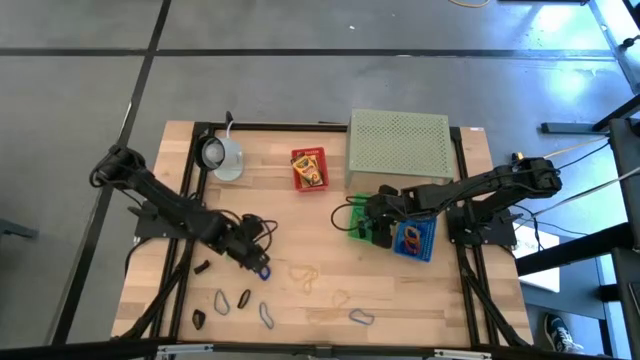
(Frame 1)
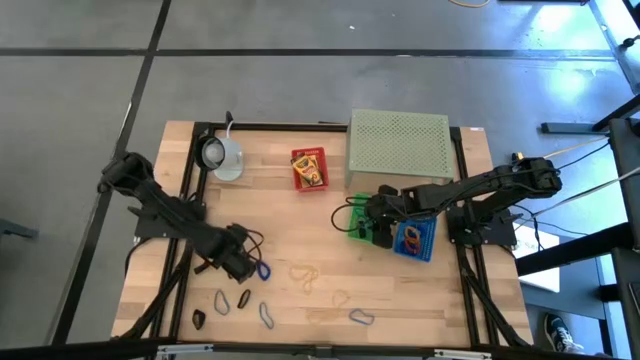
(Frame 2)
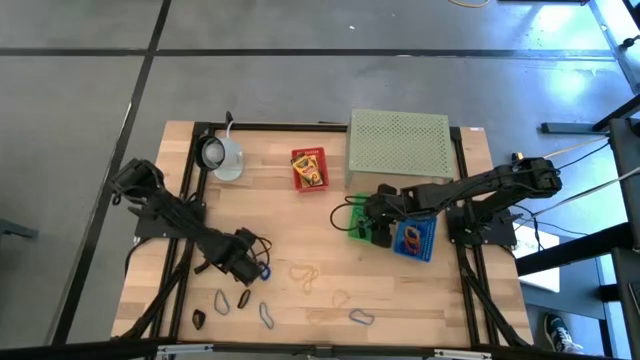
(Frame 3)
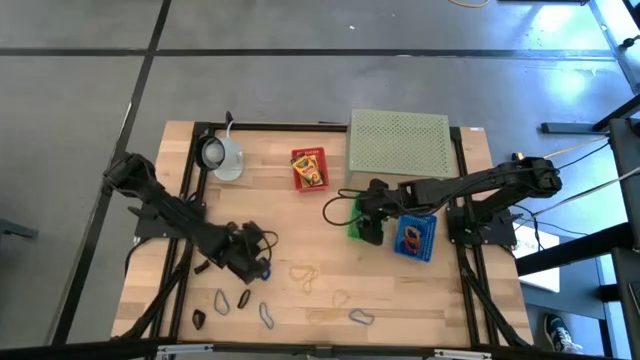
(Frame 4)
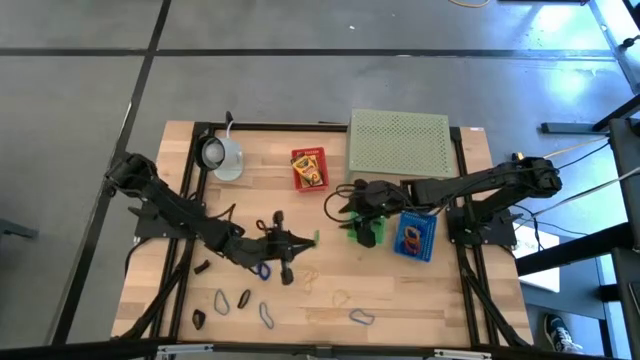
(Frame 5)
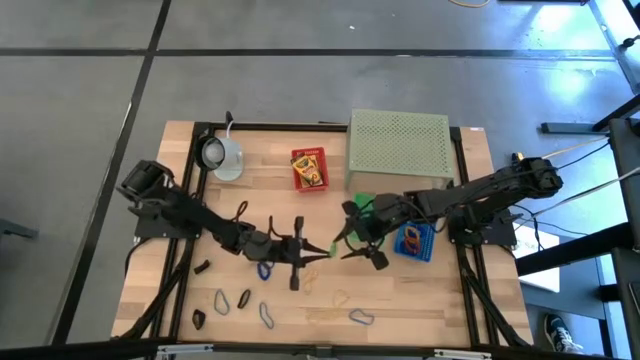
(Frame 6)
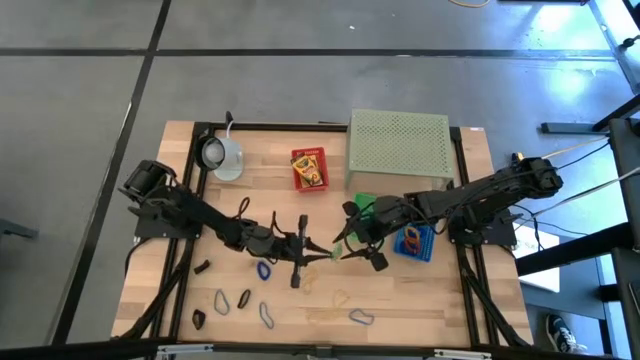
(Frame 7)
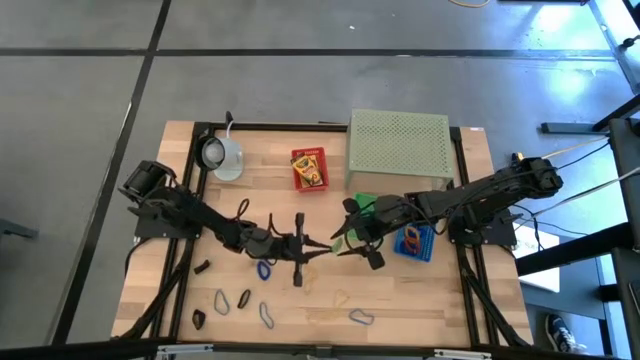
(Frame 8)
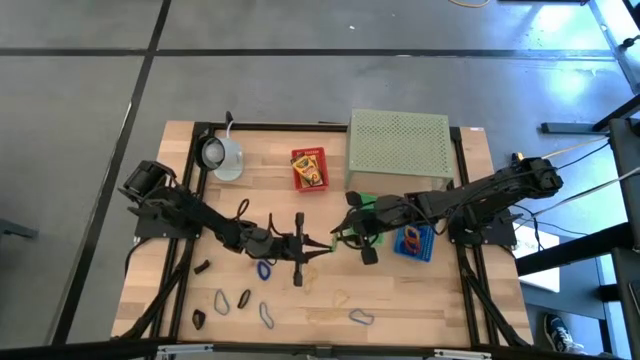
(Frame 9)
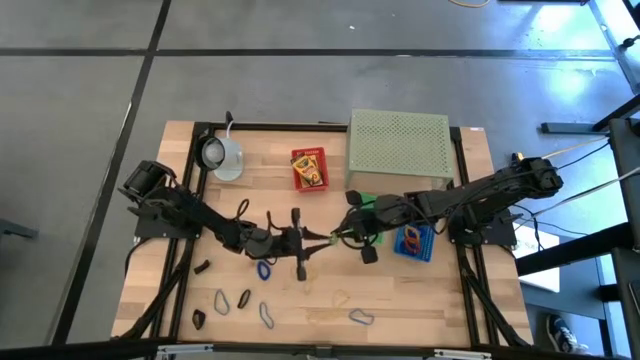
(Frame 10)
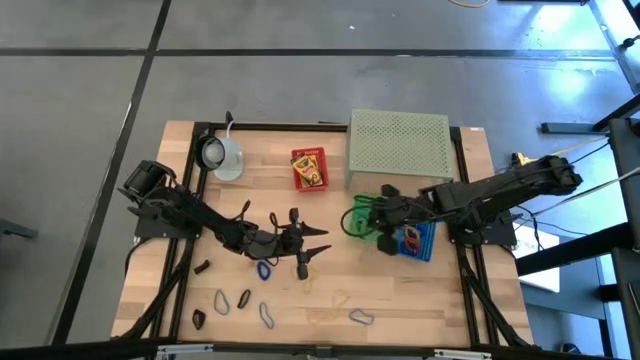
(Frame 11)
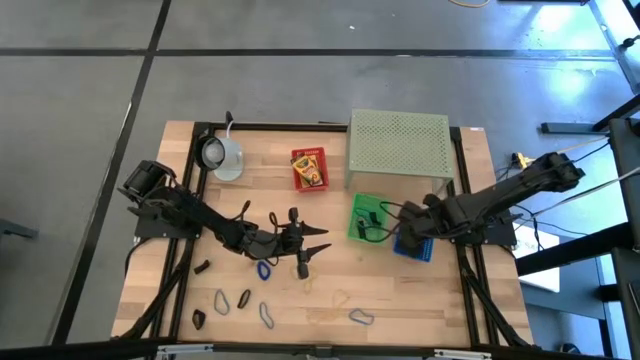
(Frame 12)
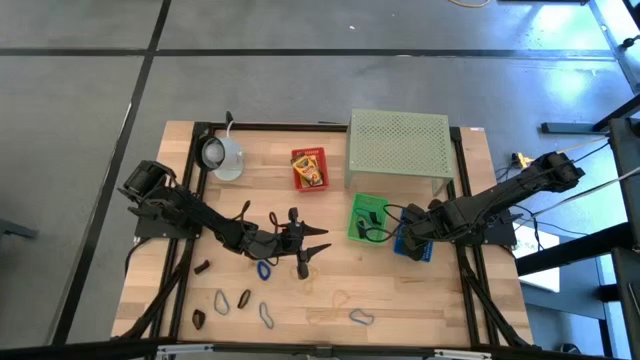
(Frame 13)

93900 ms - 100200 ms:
Task: Pick & Place Office Desk Supplies
Put the green spring keychain into the blue bin

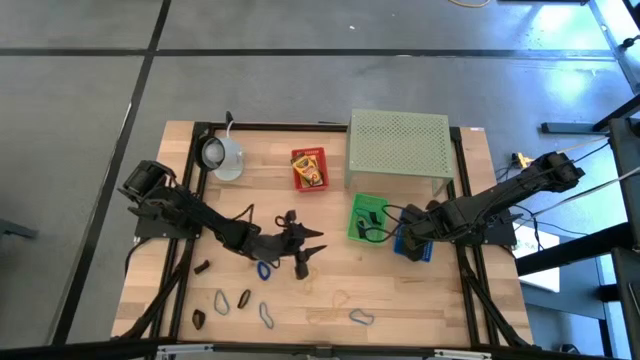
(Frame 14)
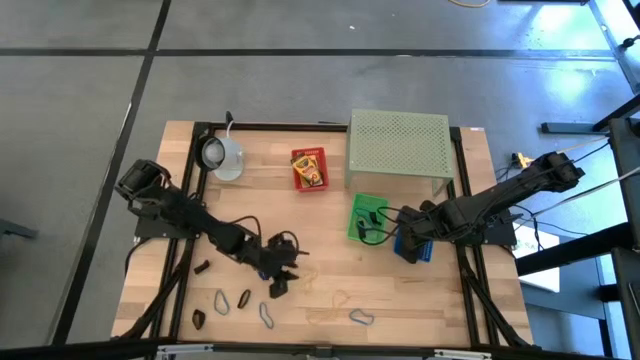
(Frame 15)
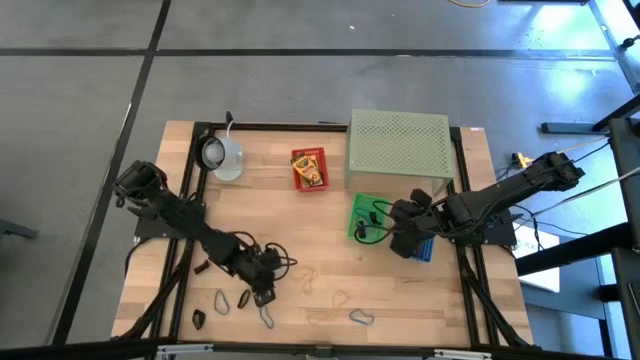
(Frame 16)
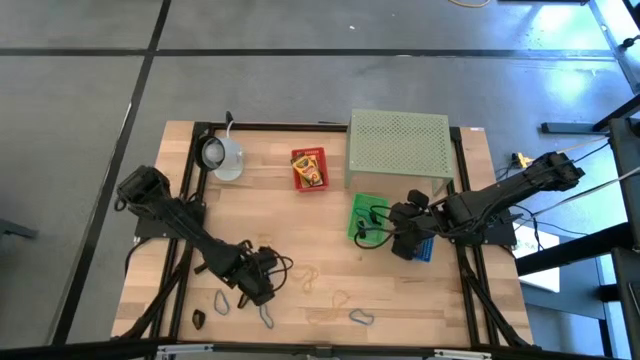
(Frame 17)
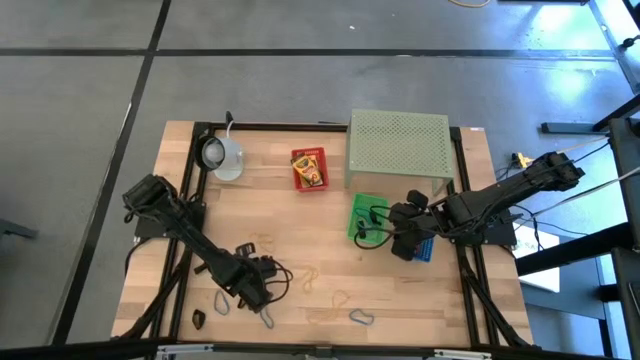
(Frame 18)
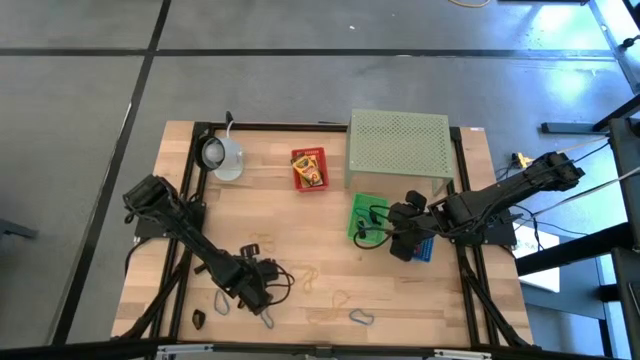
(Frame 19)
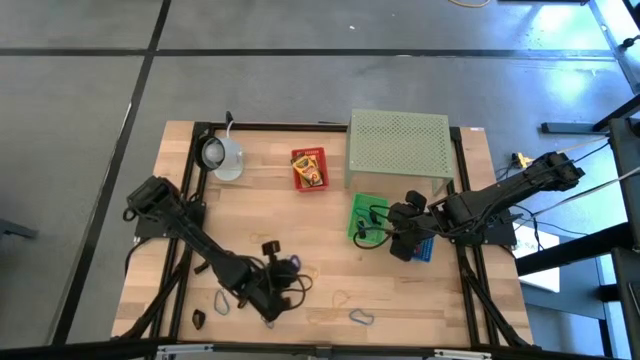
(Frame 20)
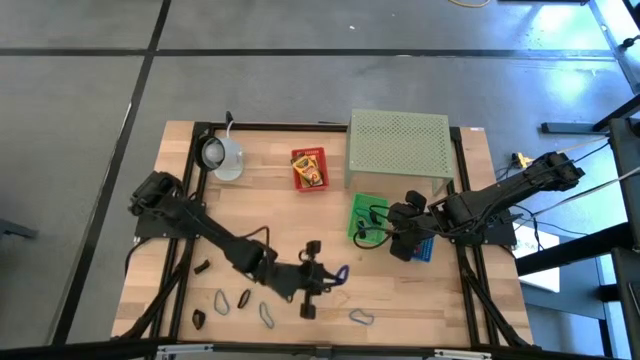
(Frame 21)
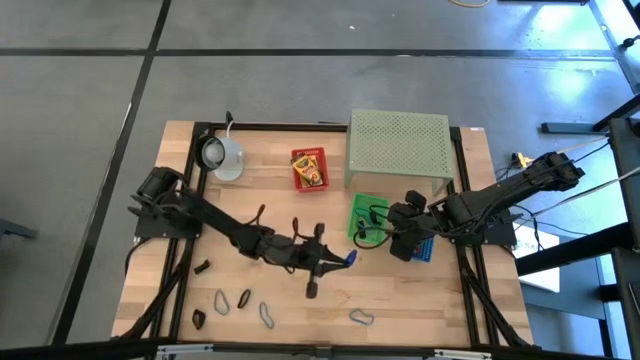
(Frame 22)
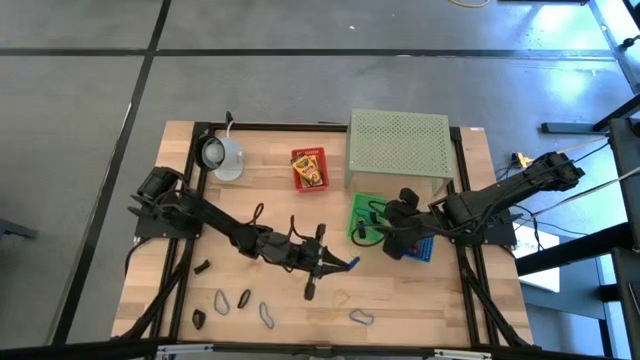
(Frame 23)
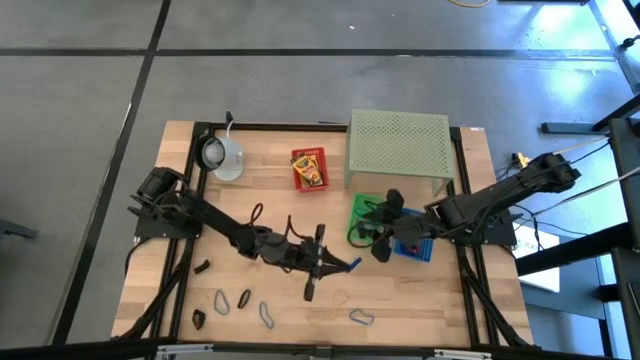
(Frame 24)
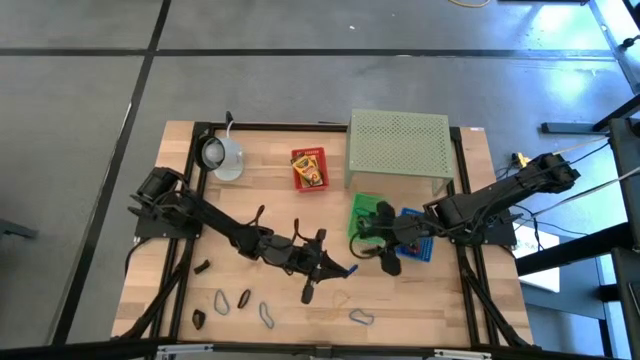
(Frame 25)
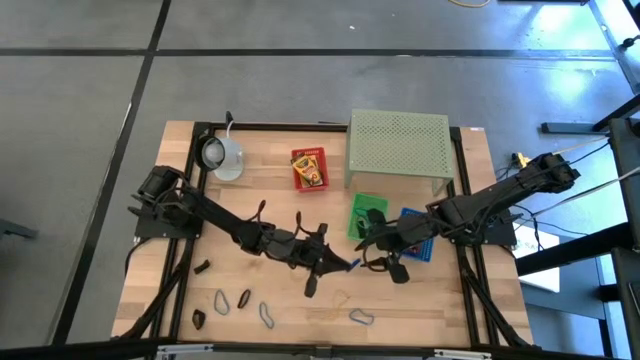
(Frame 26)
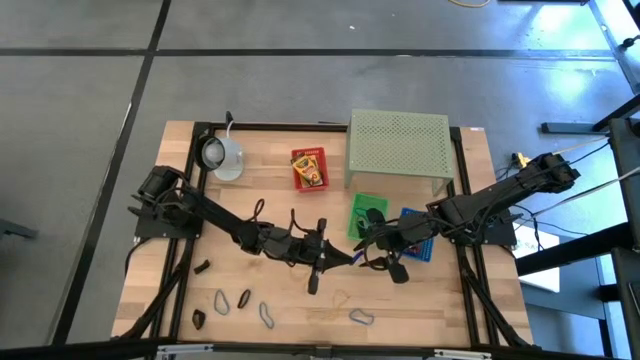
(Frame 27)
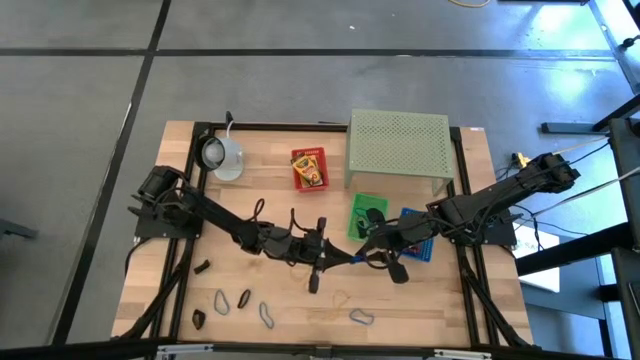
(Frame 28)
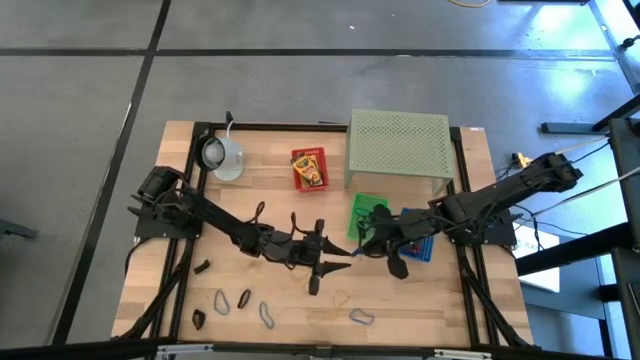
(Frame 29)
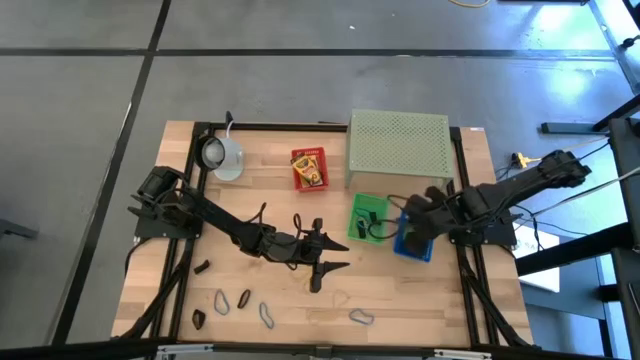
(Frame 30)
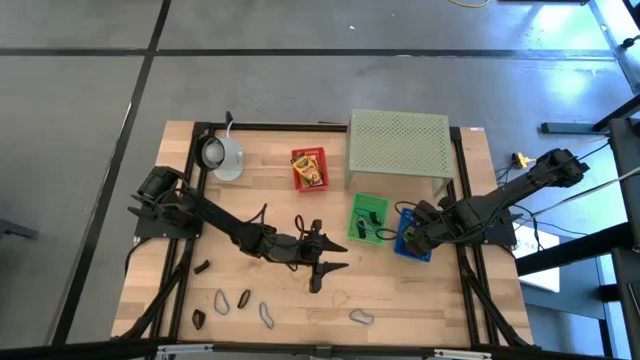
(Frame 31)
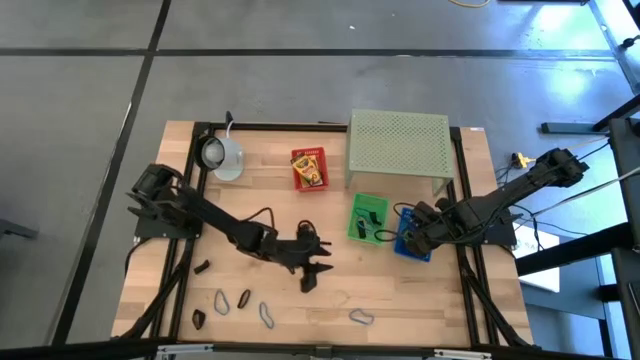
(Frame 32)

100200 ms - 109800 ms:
Put the blue spring keychain into the blue bin

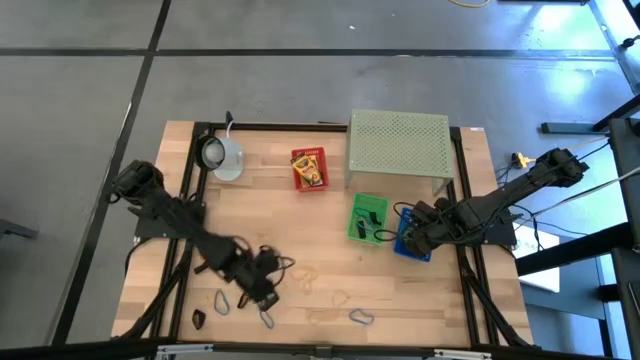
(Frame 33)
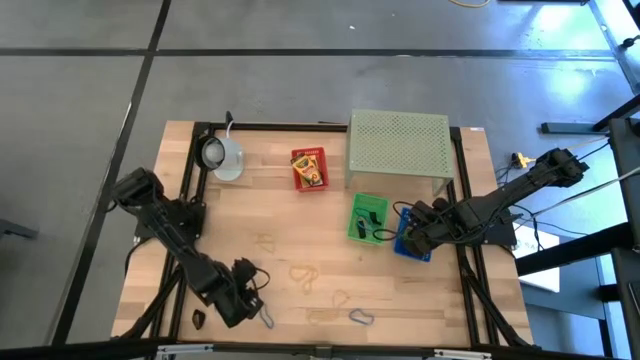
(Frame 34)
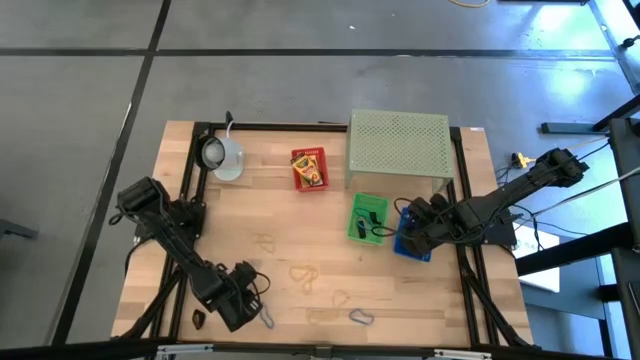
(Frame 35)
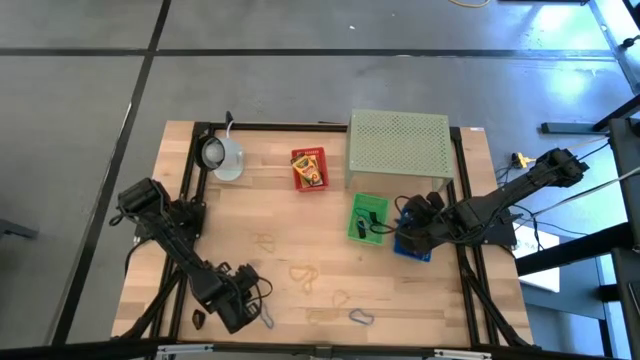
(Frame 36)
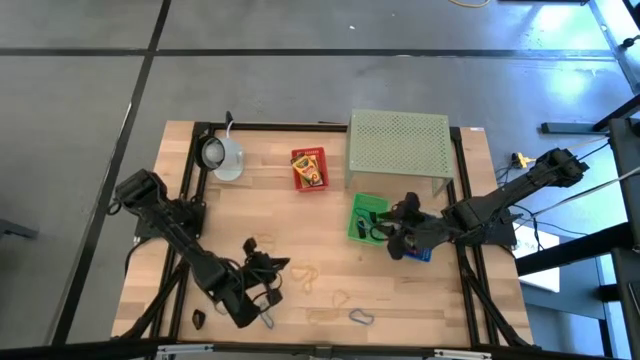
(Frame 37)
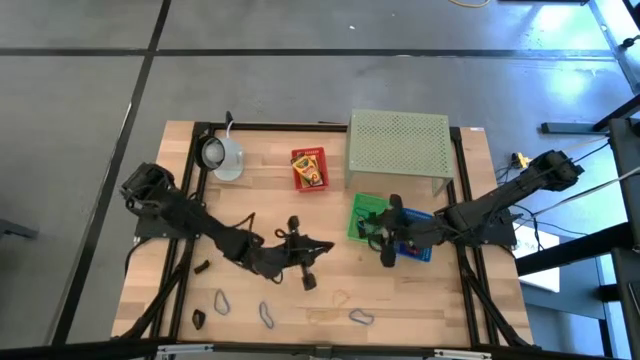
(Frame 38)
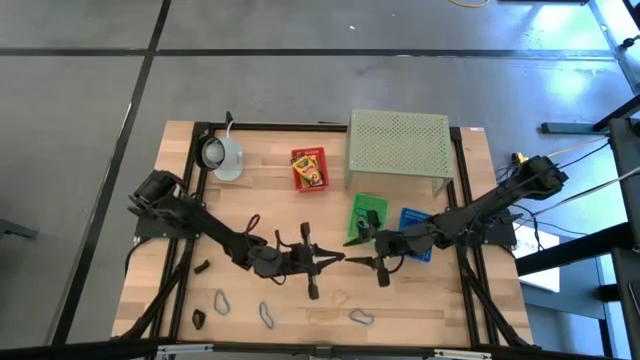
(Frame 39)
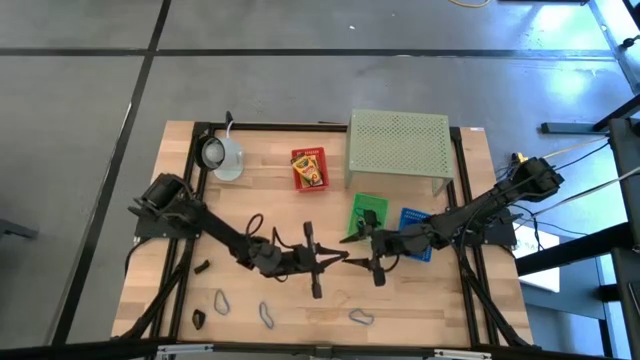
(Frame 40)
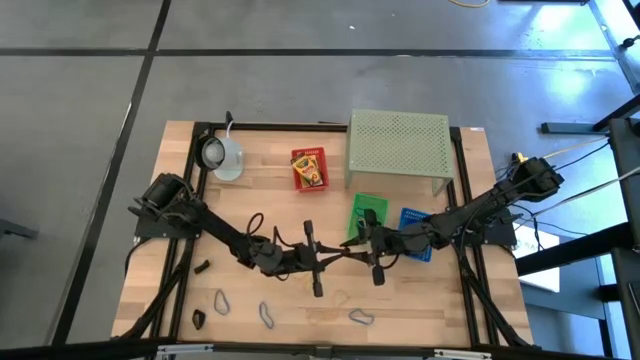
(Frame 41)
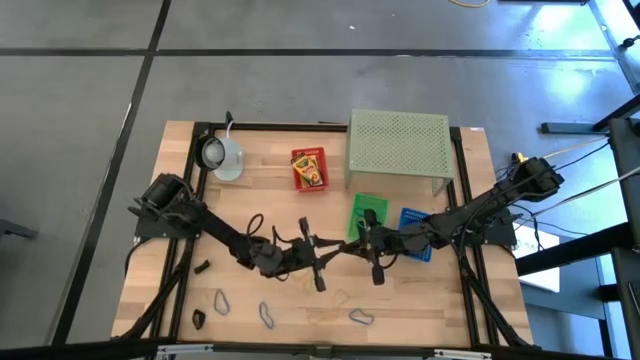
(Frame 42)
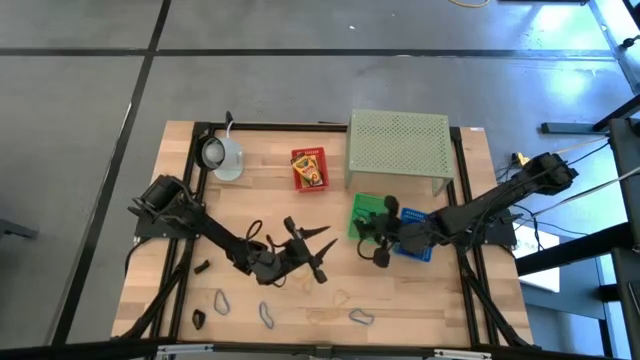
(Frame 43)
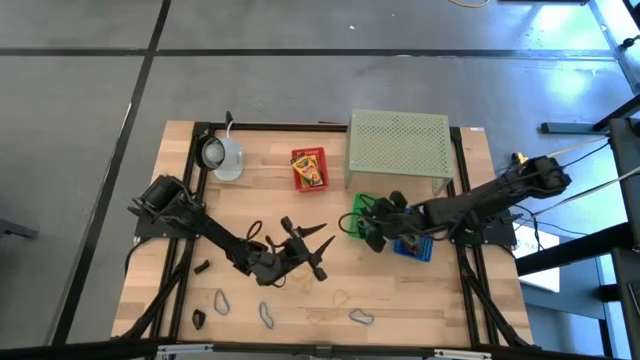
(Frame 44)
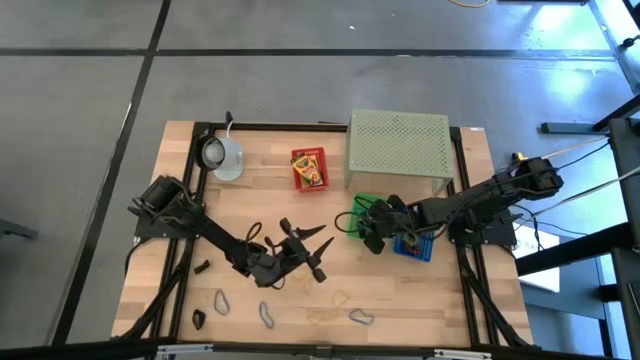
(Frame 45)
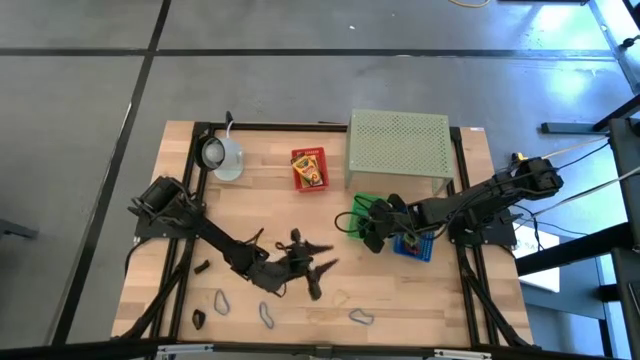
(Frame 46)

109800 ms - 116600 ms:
Put the black rubber band into the green bin
